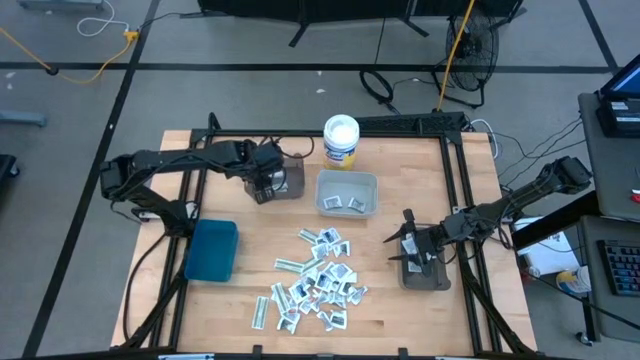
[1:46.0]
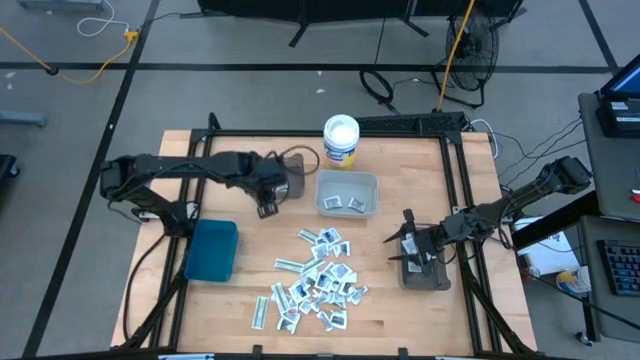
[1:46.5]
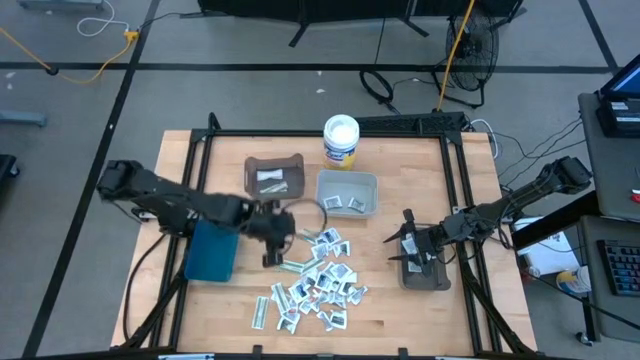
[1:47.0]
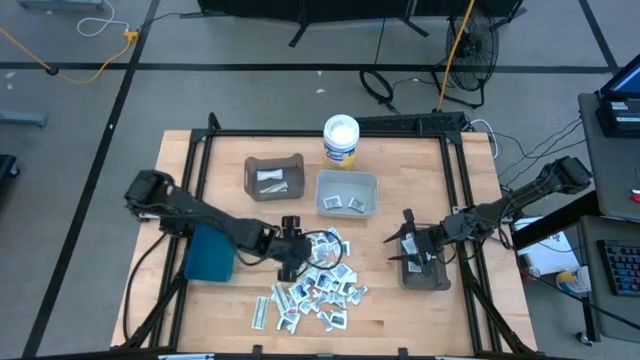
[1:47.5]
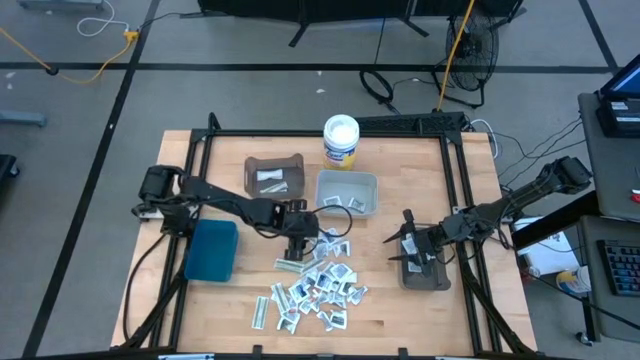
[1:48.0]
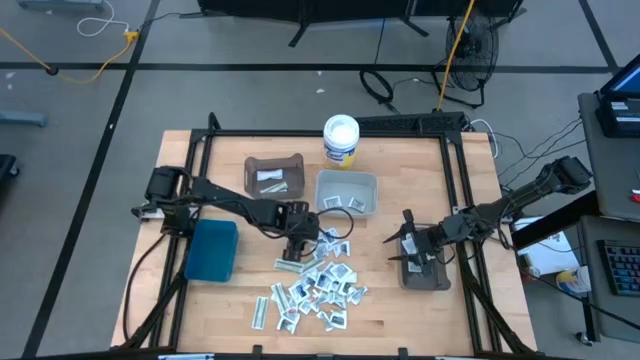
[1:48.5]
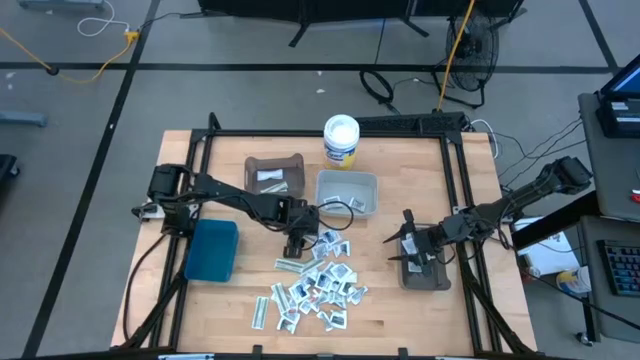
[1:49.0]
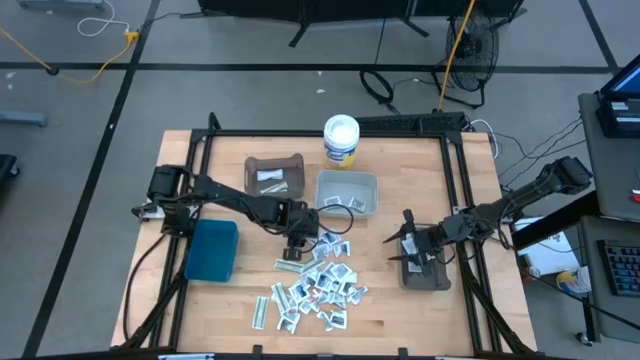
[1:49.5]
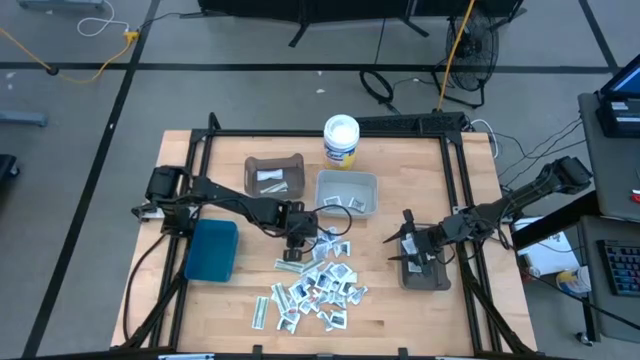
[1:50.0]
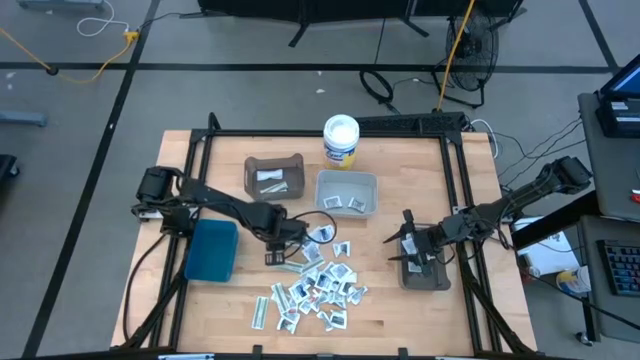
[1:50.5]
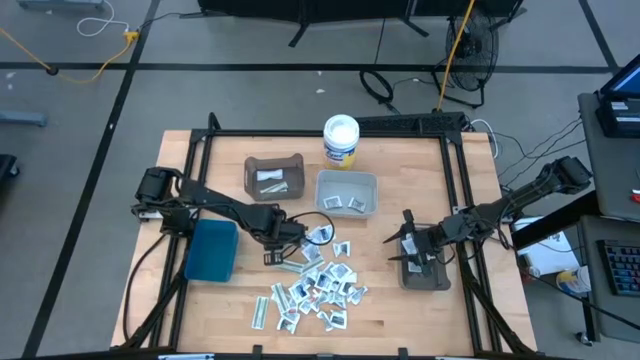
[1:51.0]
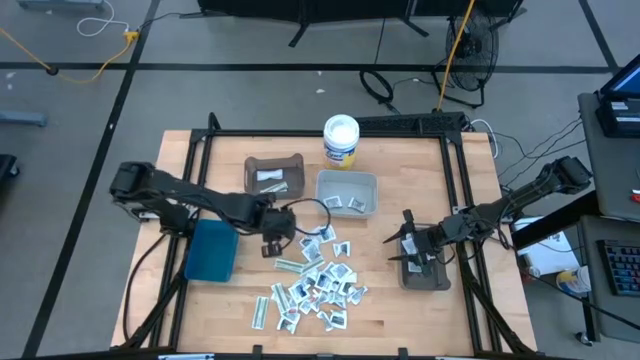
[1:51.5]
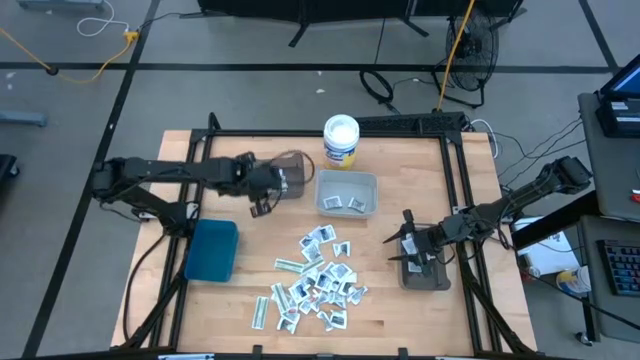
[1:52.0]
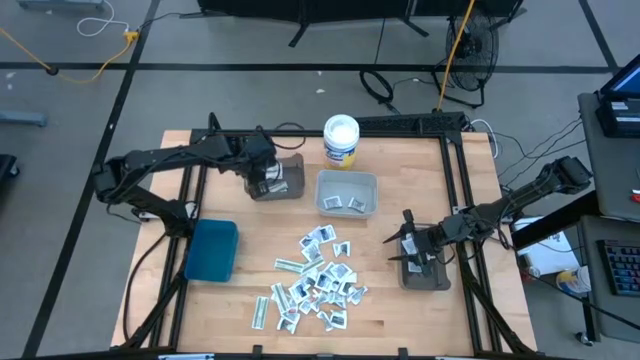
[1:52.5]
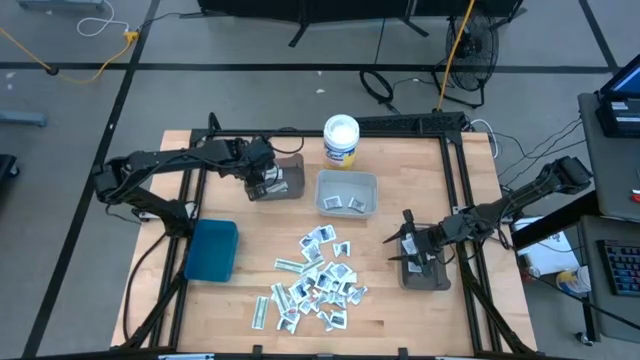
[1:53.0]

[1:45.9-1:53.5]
Task: Pick & Place First Aid Supplies
Put the green bandage pack into the top black bin

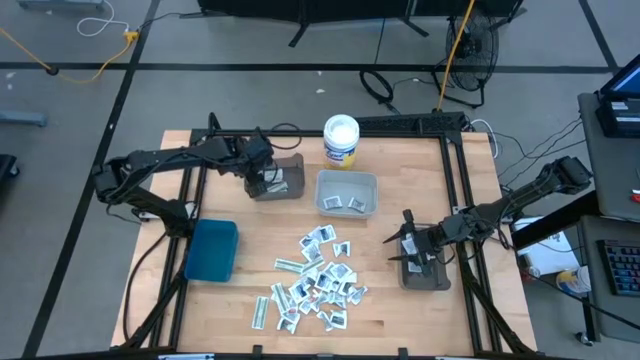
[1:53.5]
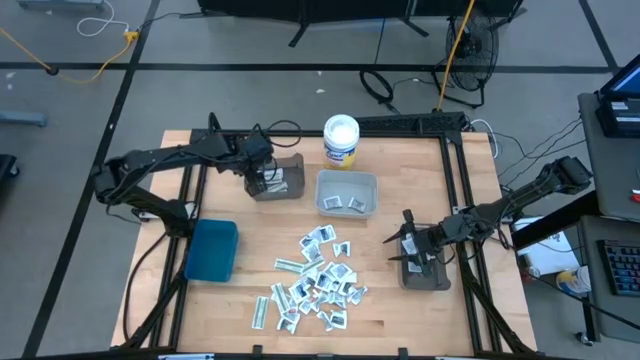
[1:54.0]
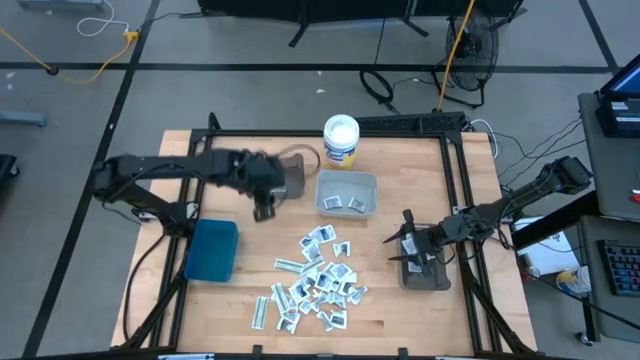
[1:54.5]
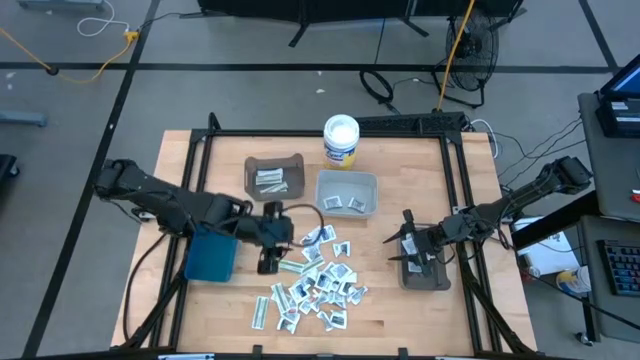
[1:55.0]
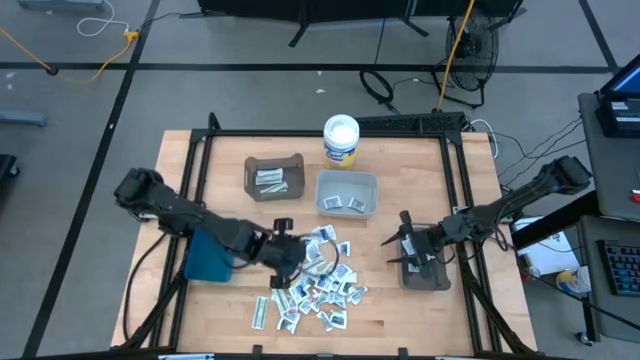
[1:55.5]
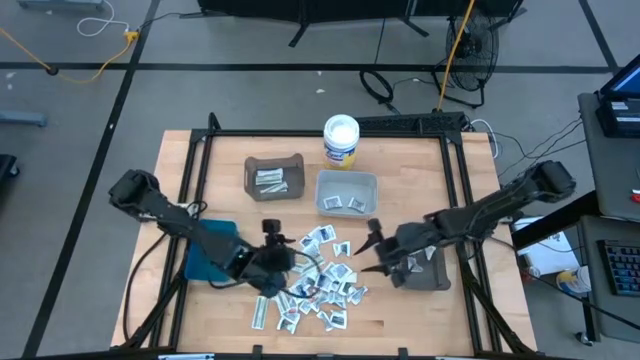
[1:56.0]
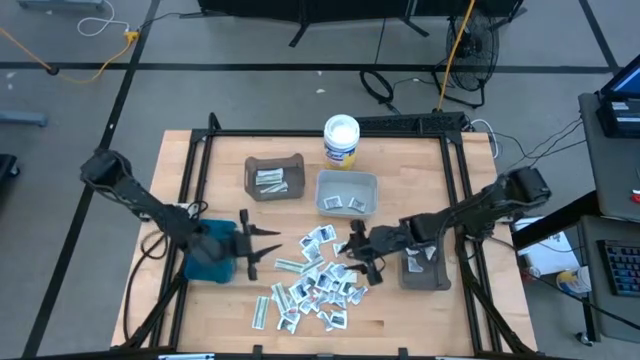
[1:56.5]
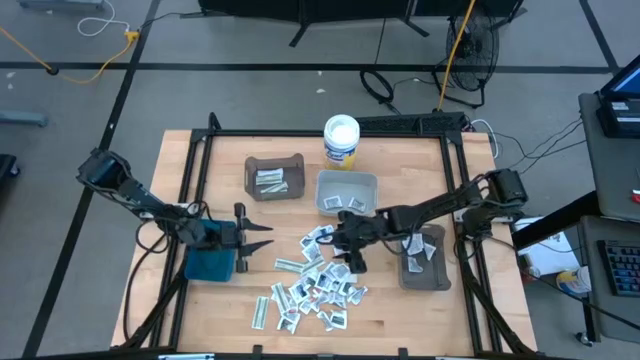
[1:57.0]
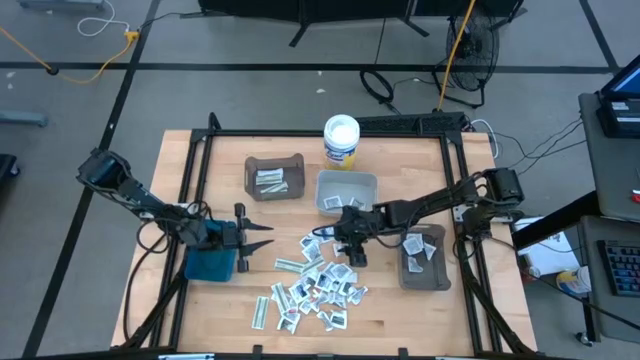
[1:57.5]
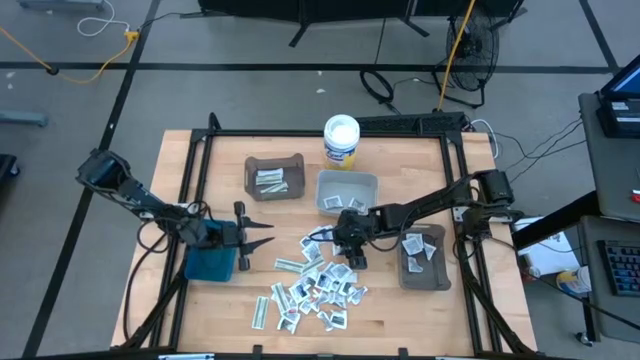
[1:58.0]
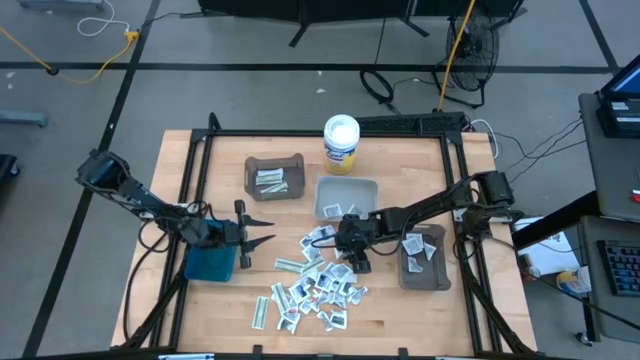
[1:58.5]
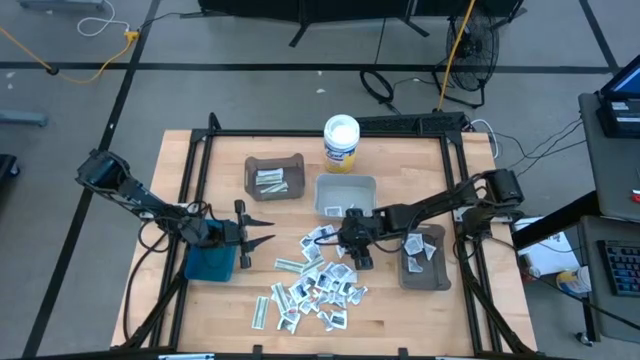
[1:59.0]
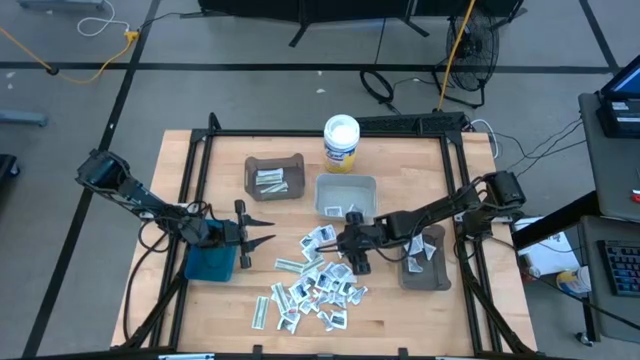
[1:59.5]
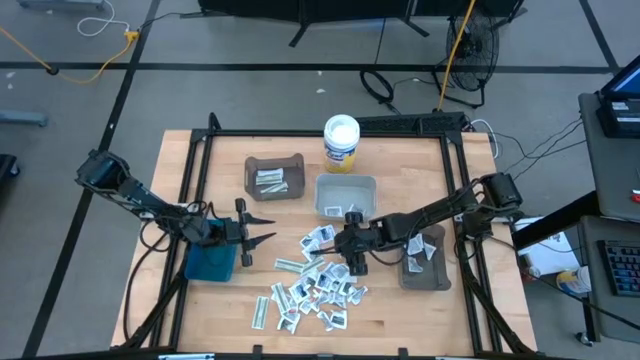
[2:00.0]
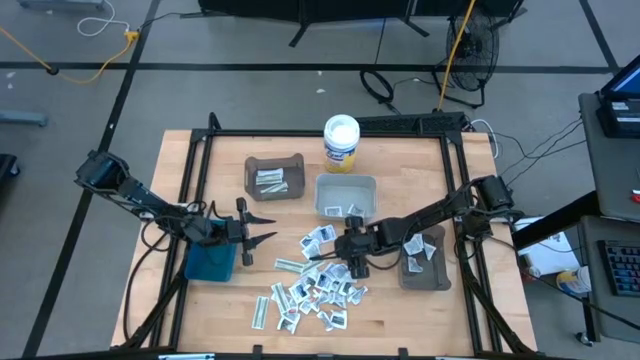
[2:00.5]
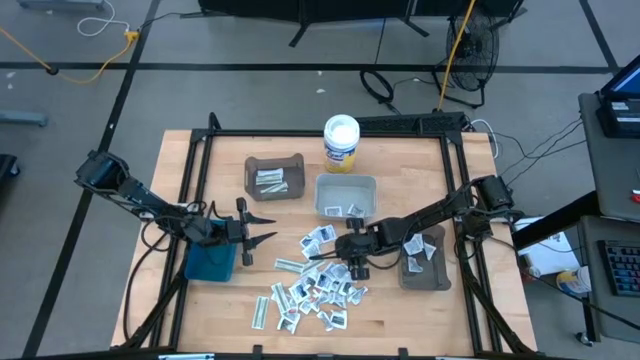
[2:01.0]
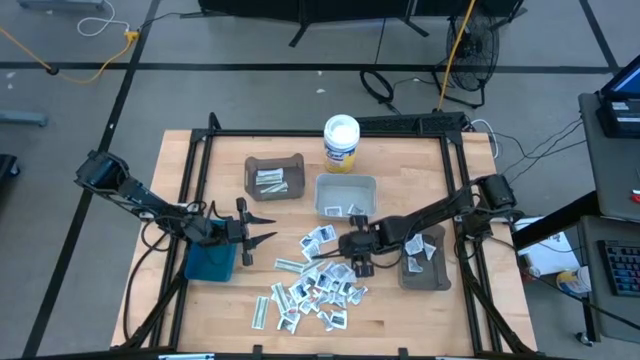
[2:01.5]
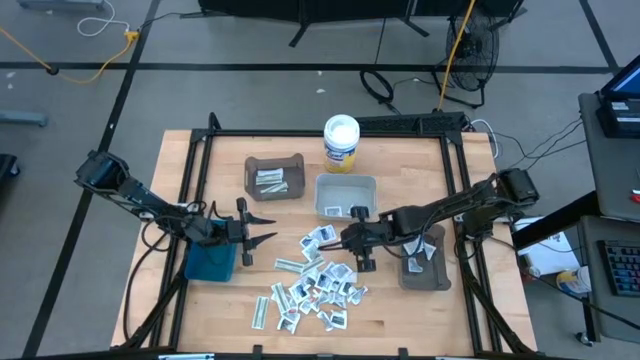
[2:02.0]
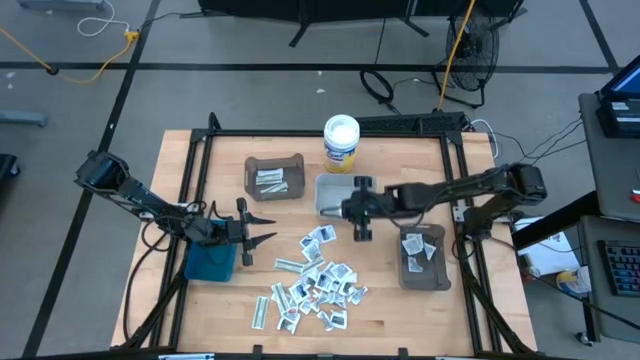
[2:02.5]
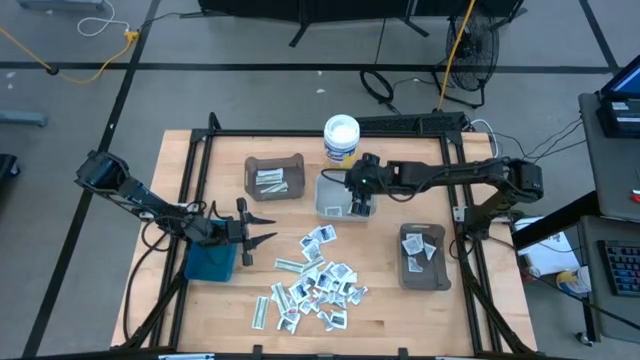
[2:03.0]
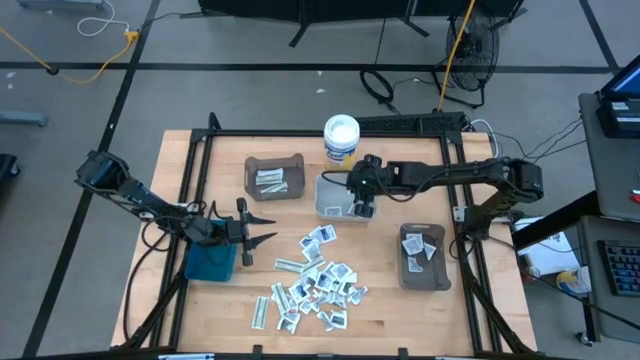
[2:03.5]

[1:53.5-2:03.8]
Put the gray towelette pack into the gray bin

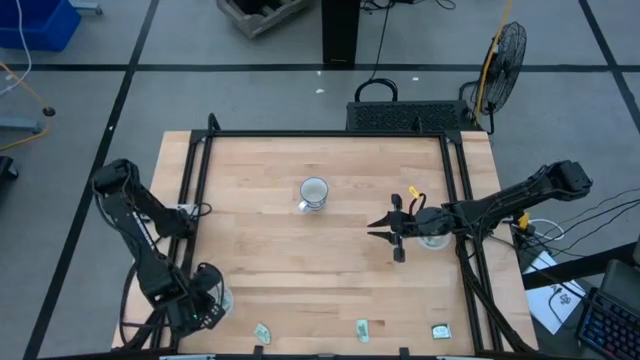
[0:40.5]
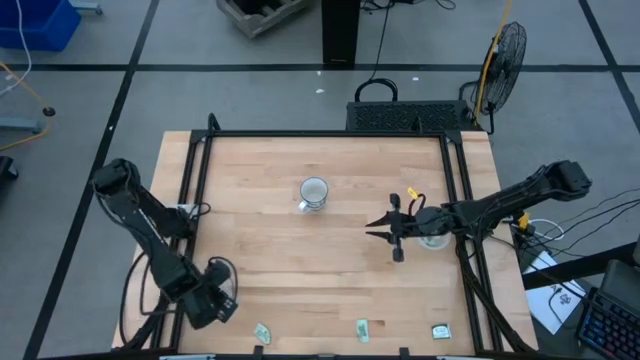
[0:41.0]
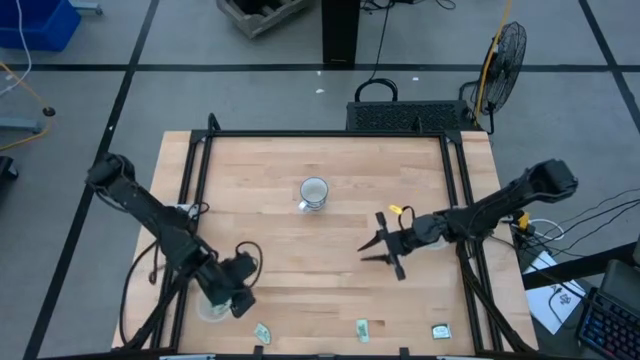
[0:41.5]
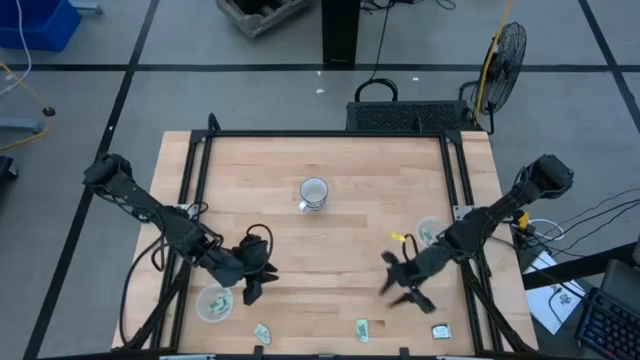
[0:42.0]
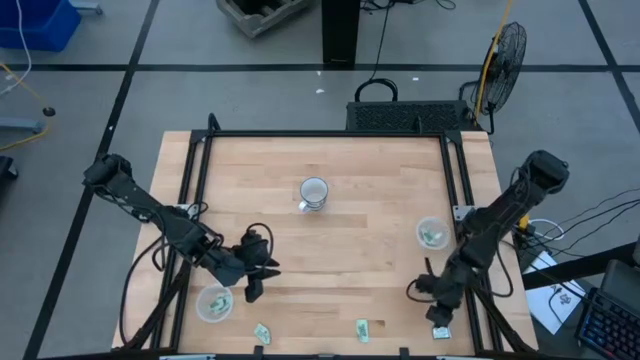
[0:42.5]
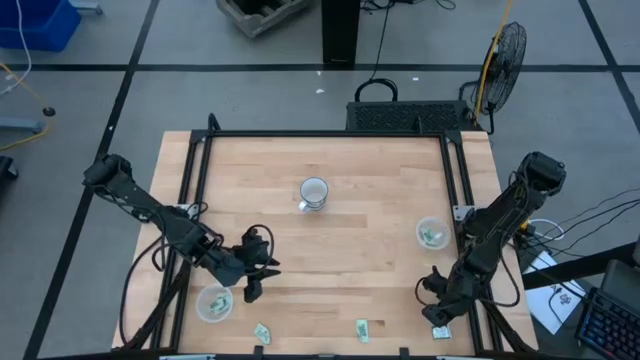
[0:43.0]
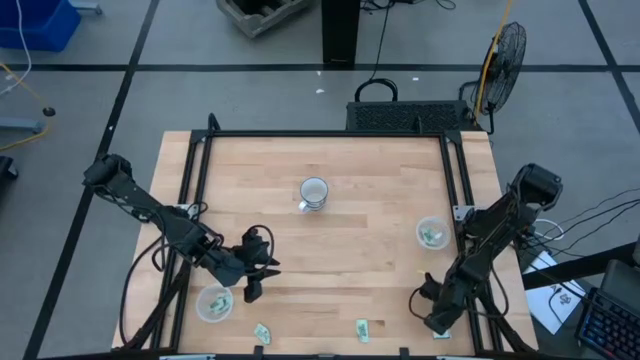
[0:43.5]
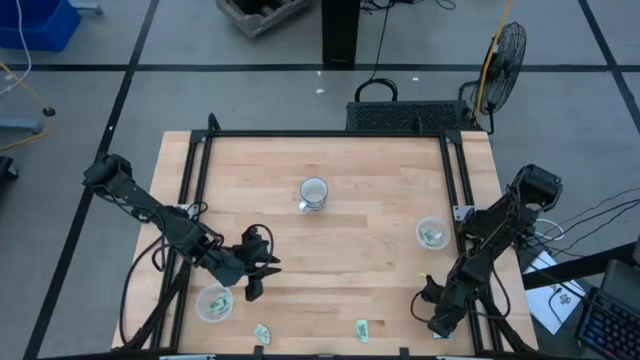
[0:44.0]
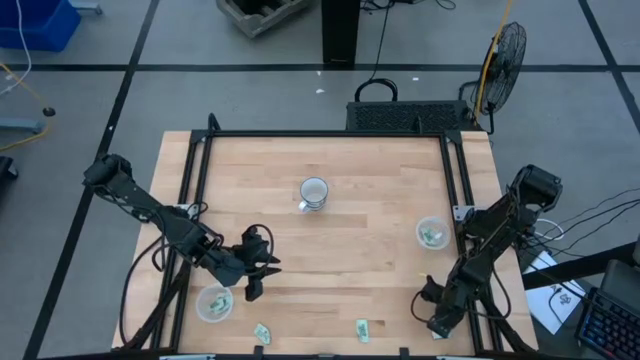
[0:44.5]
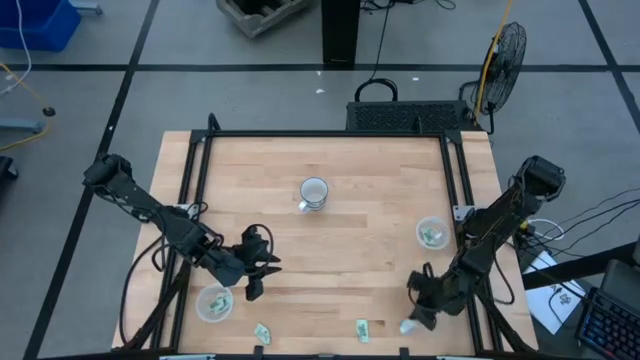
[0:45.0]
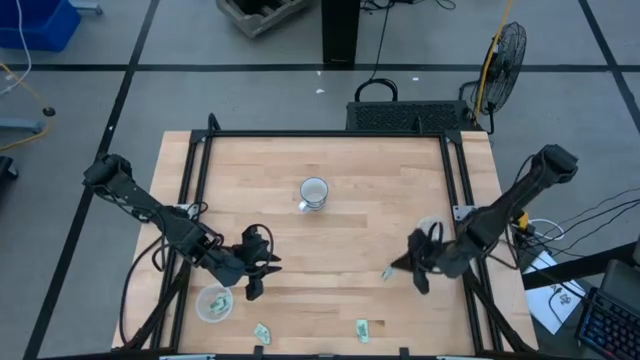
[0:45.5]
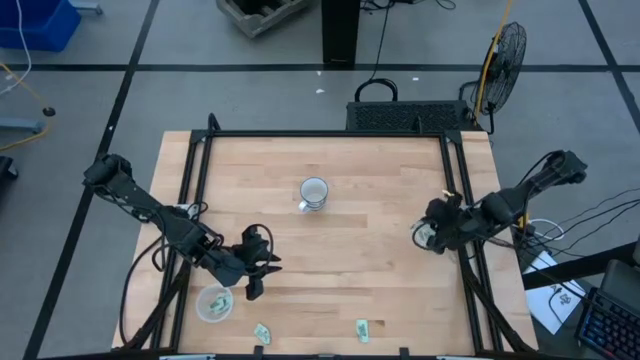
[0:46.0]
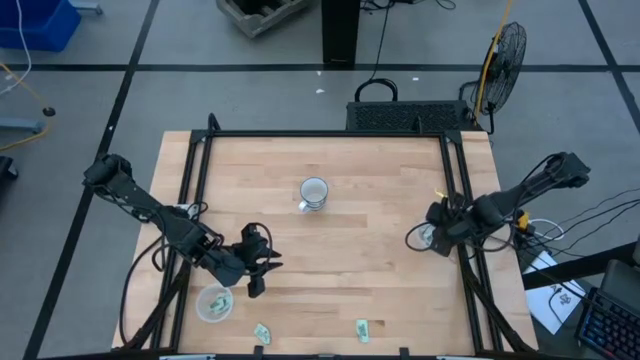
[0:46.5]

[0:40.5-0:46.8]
Task: Pick and place Stevia / Truvia into bins
Put the dark green truvia packet into the right transparent container
